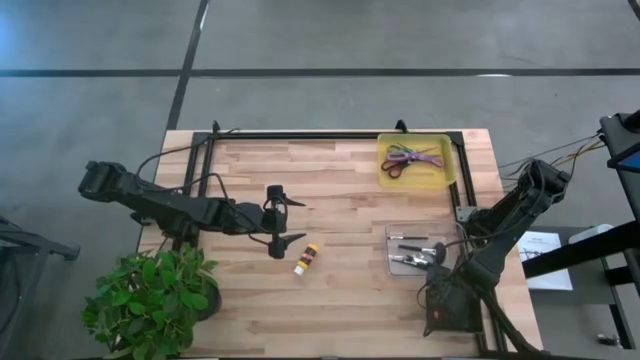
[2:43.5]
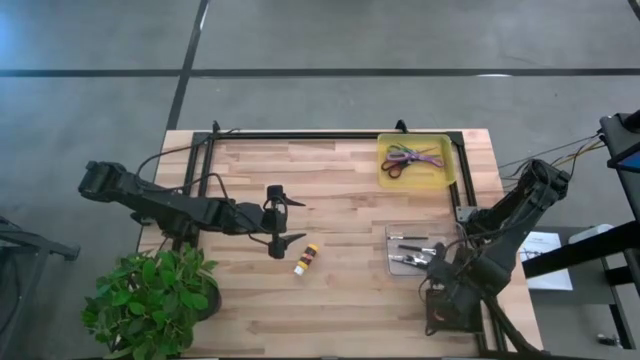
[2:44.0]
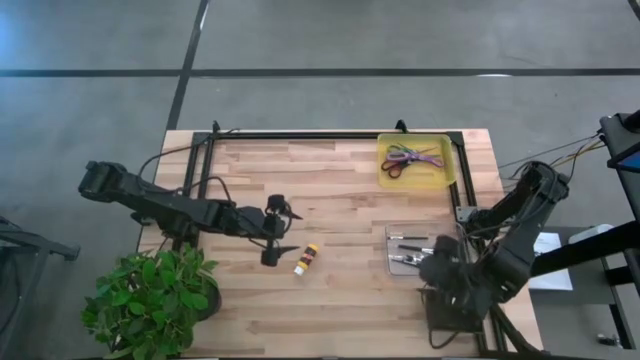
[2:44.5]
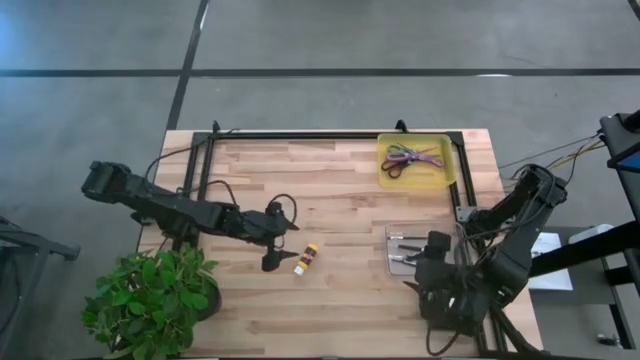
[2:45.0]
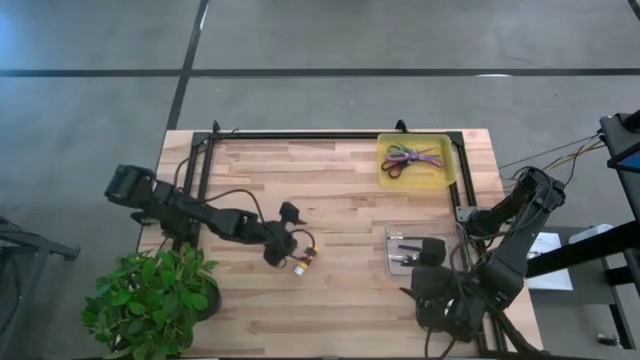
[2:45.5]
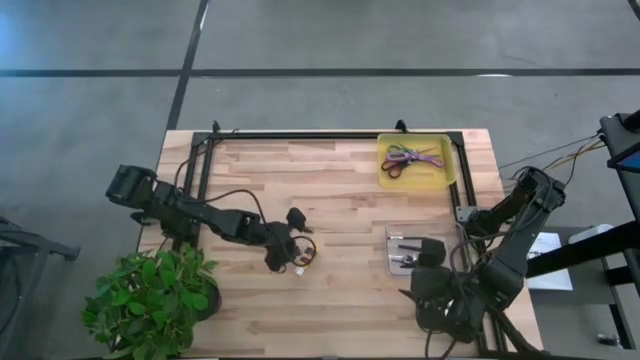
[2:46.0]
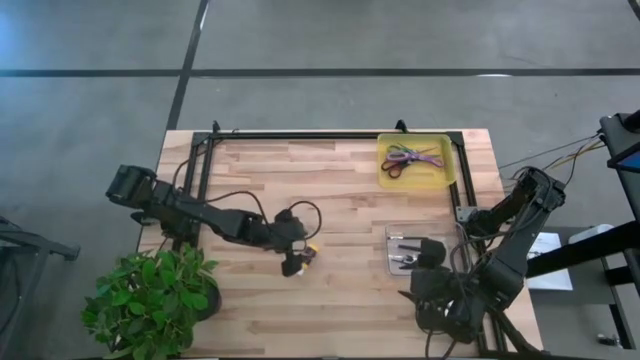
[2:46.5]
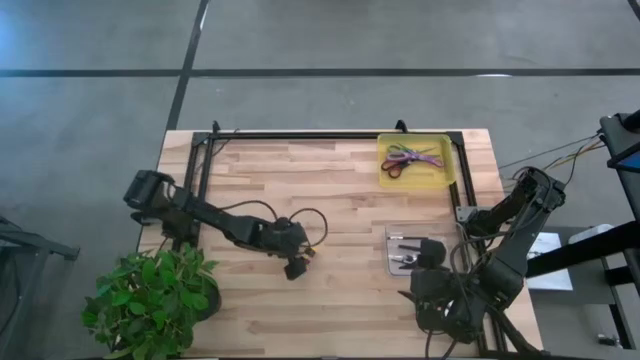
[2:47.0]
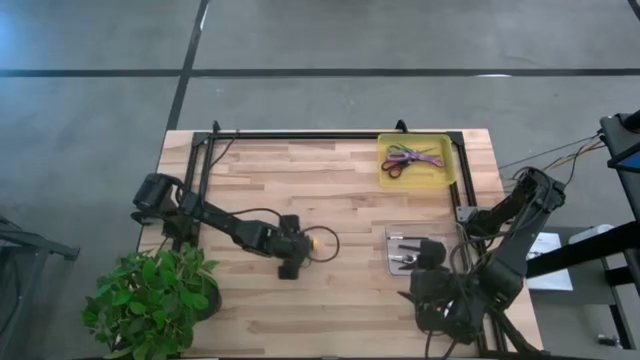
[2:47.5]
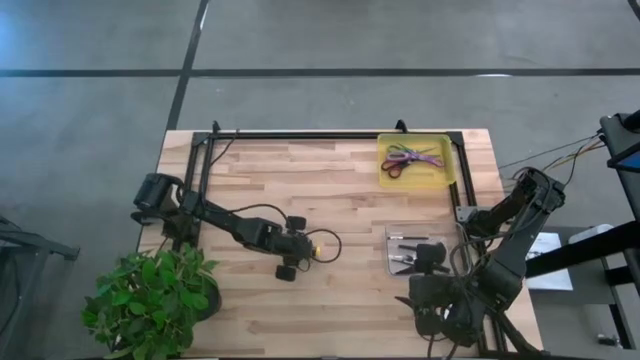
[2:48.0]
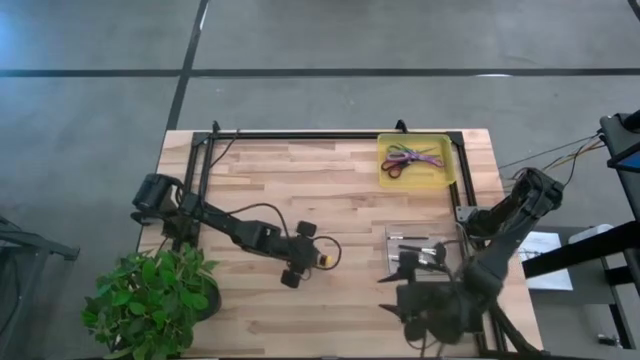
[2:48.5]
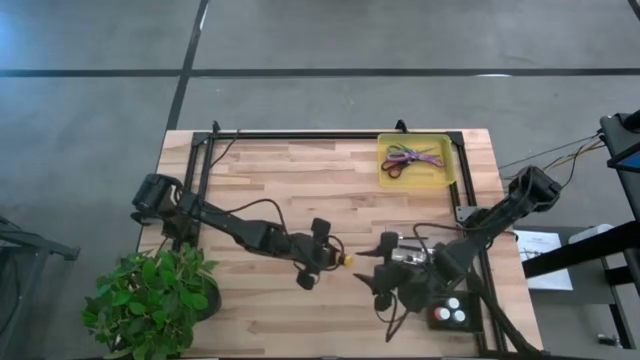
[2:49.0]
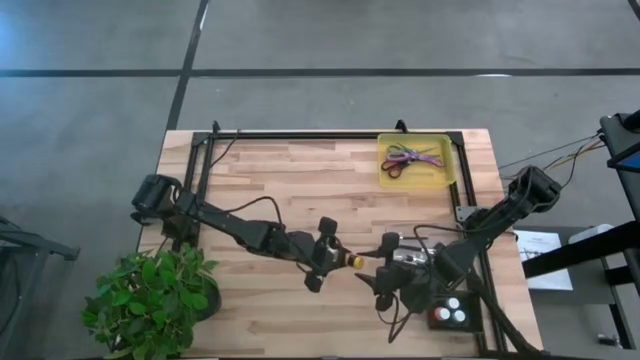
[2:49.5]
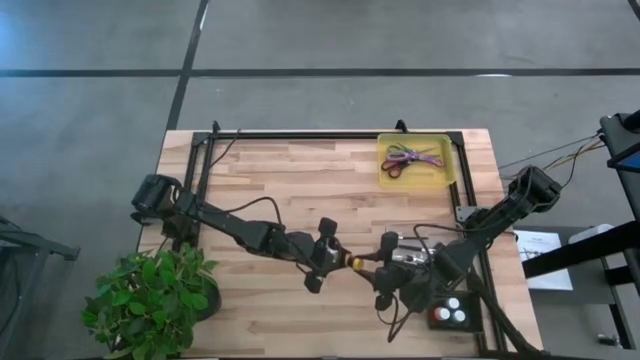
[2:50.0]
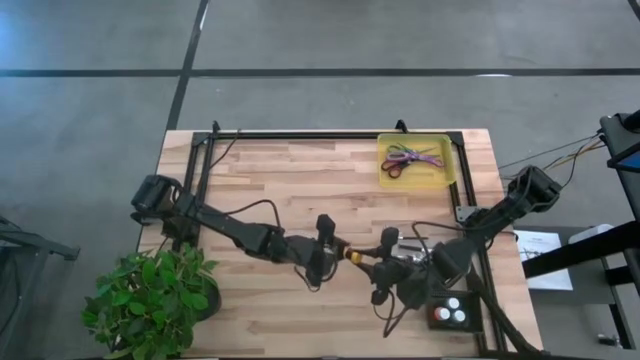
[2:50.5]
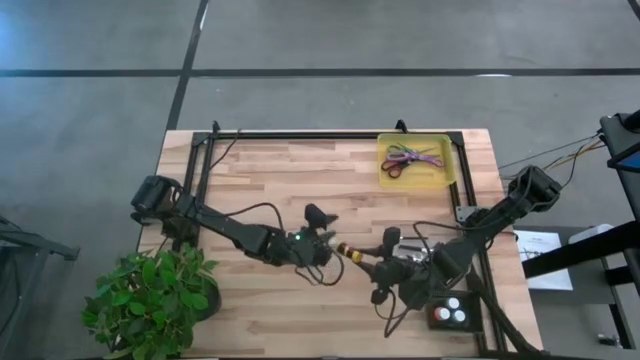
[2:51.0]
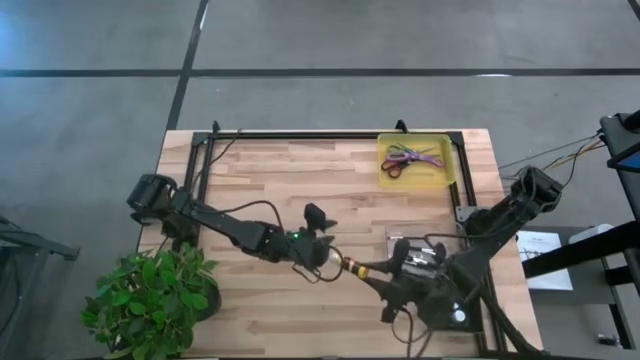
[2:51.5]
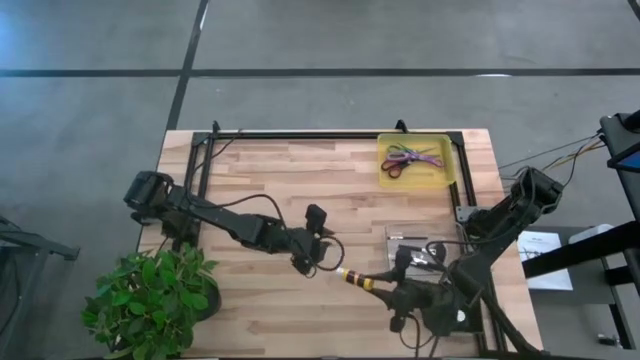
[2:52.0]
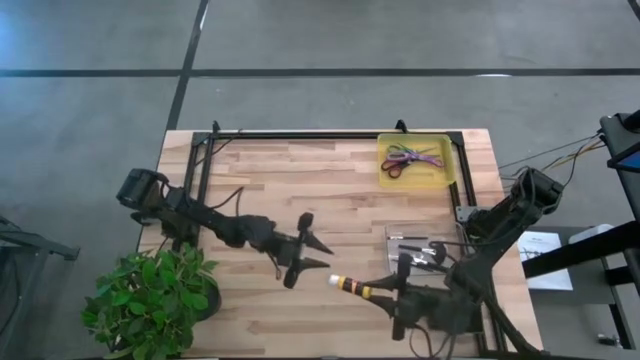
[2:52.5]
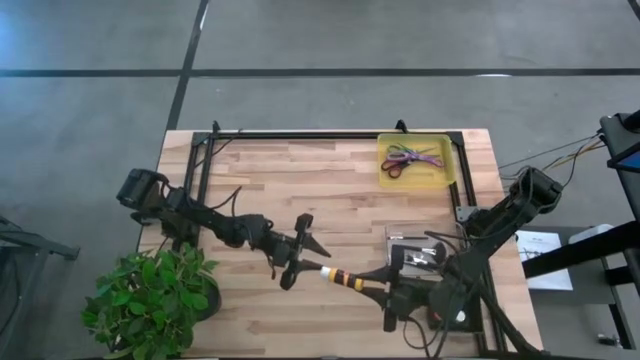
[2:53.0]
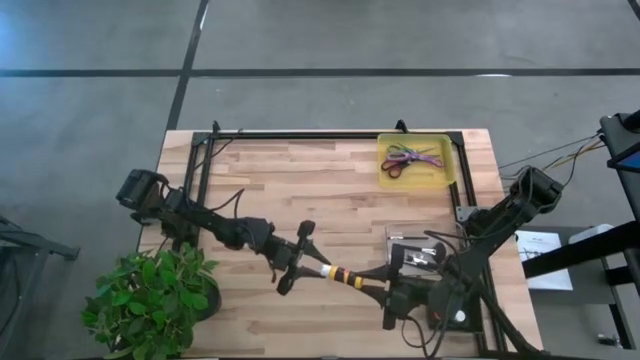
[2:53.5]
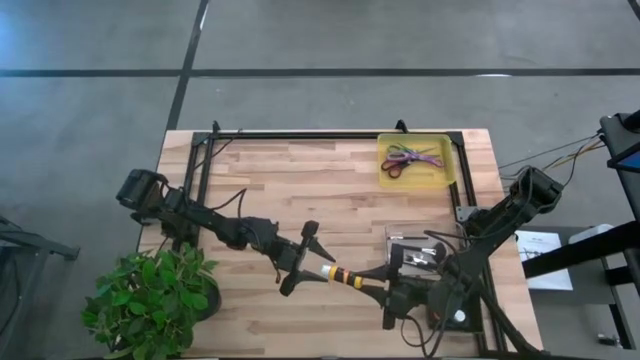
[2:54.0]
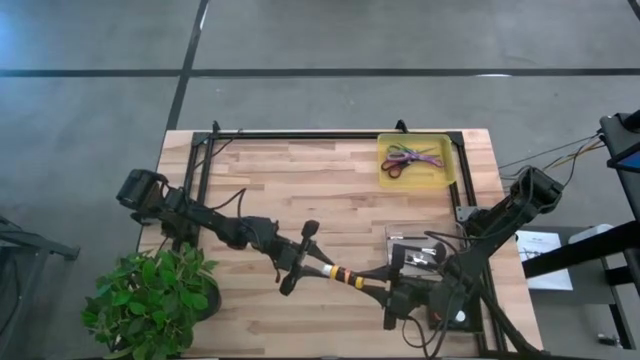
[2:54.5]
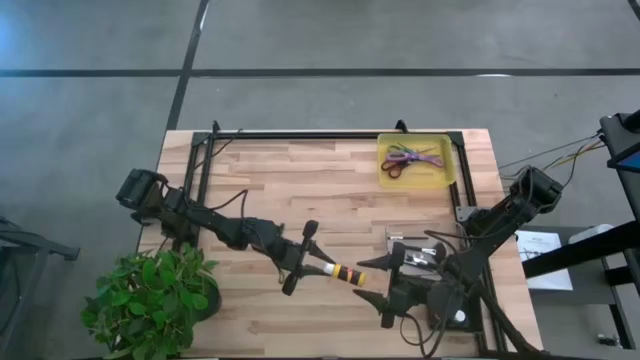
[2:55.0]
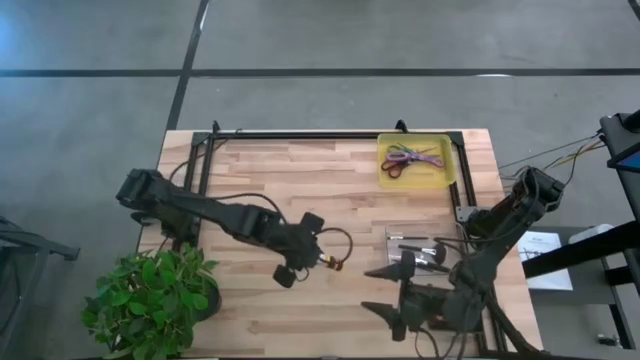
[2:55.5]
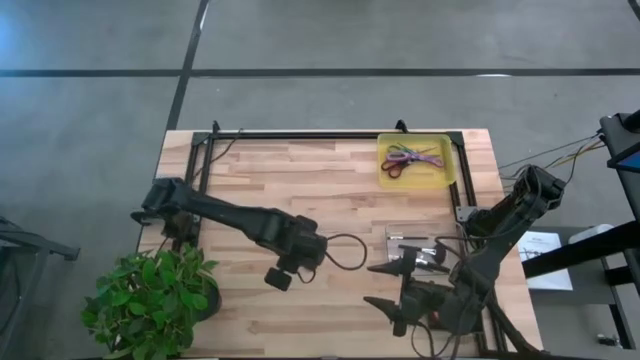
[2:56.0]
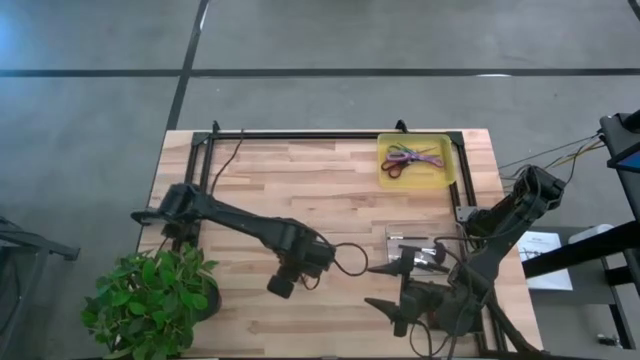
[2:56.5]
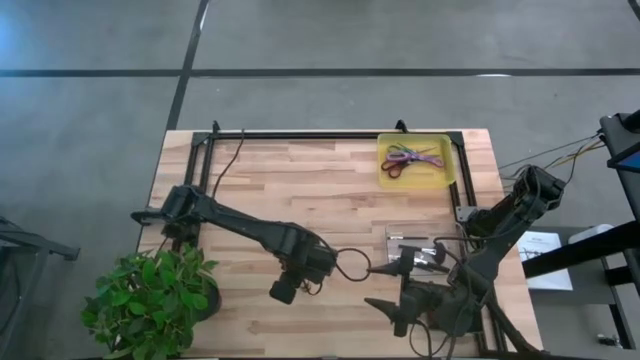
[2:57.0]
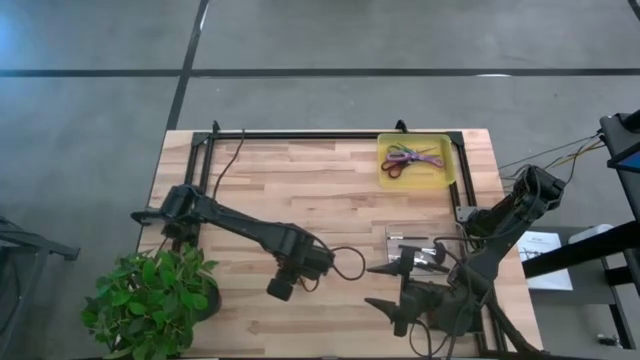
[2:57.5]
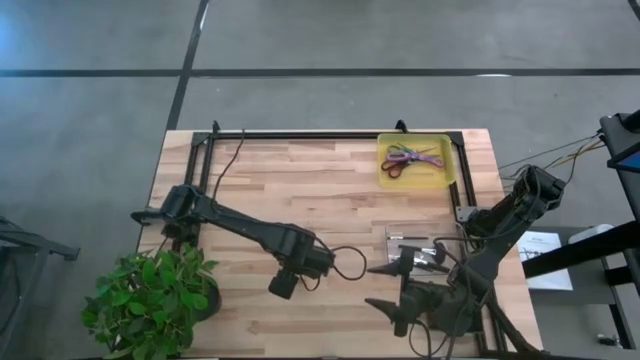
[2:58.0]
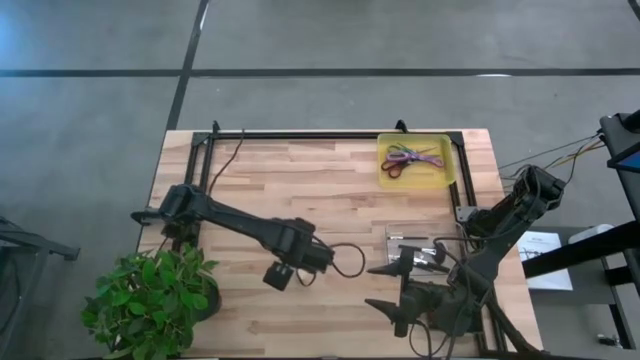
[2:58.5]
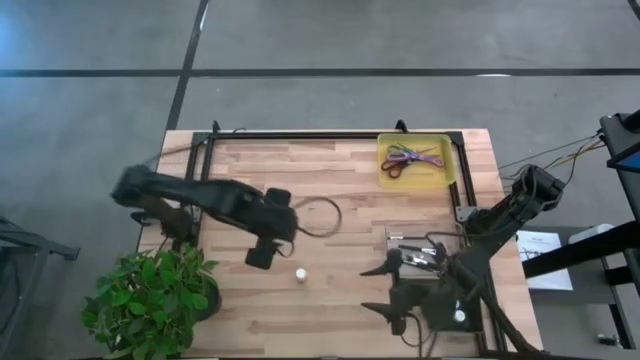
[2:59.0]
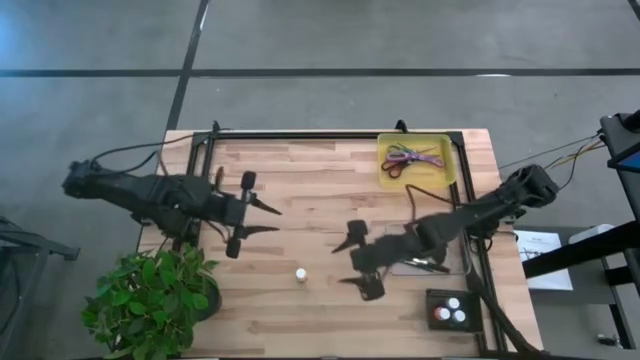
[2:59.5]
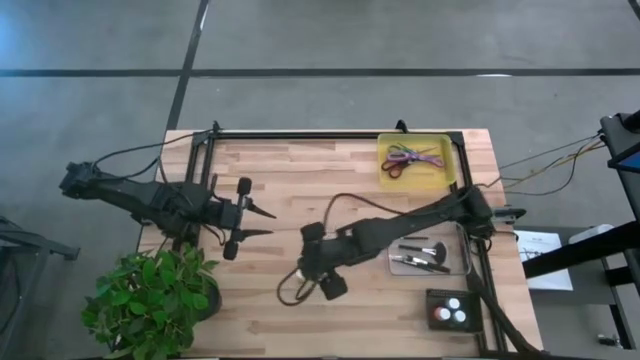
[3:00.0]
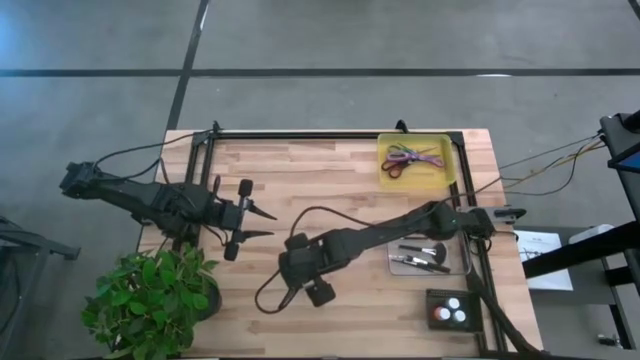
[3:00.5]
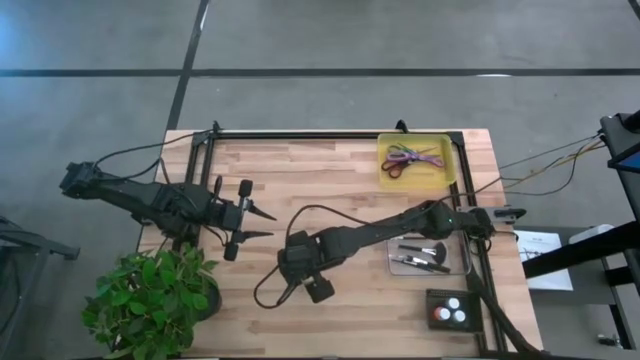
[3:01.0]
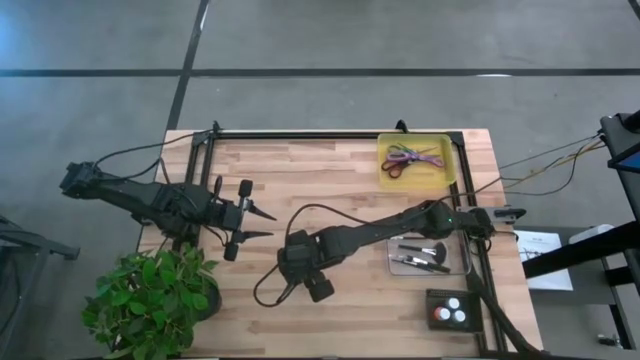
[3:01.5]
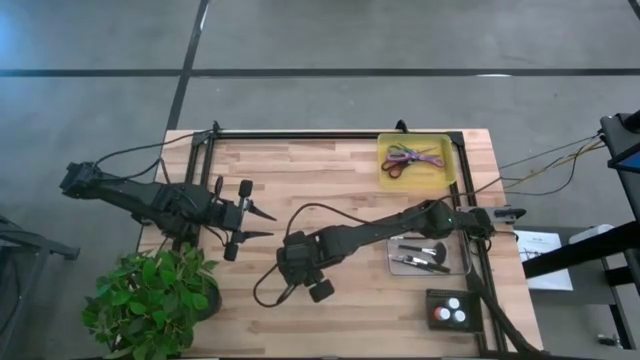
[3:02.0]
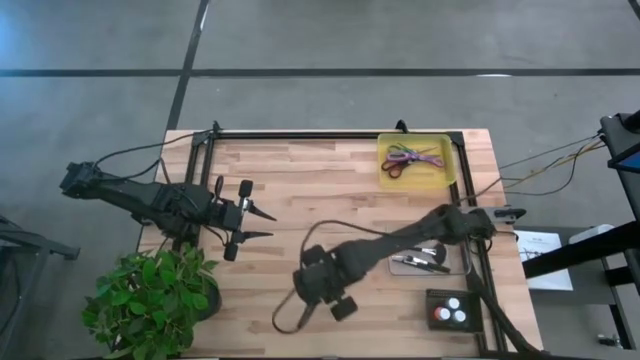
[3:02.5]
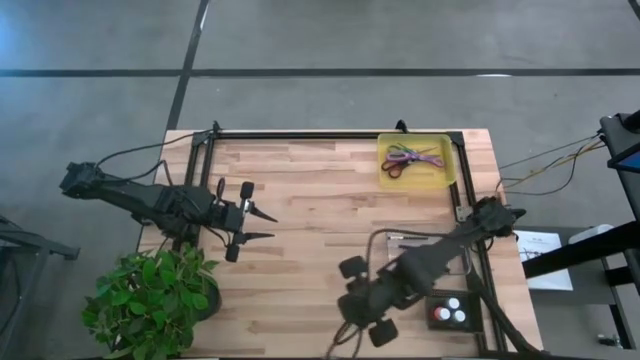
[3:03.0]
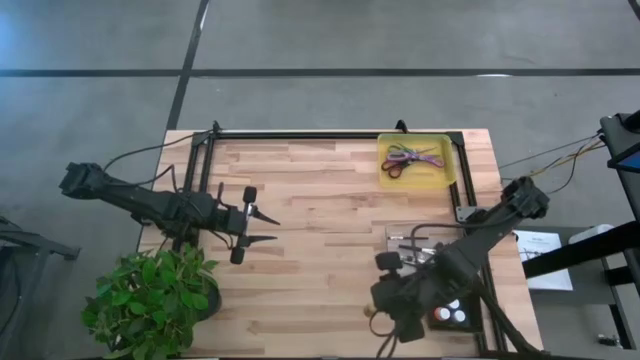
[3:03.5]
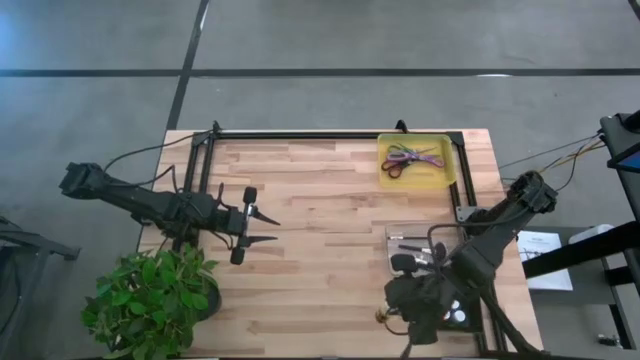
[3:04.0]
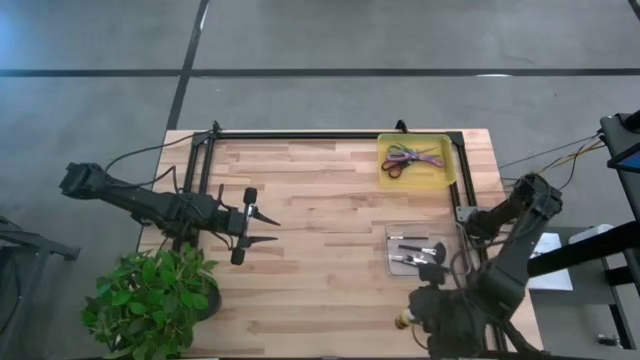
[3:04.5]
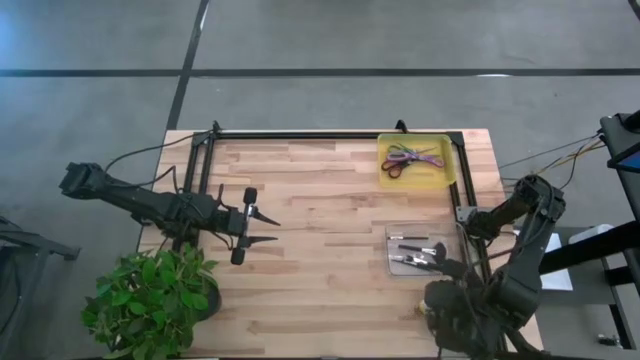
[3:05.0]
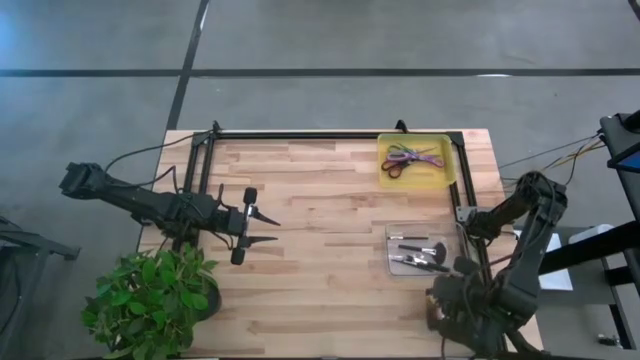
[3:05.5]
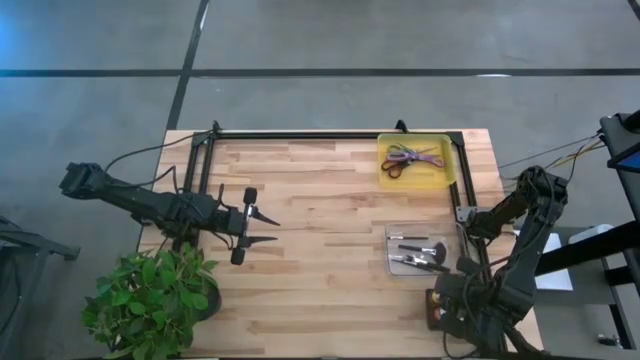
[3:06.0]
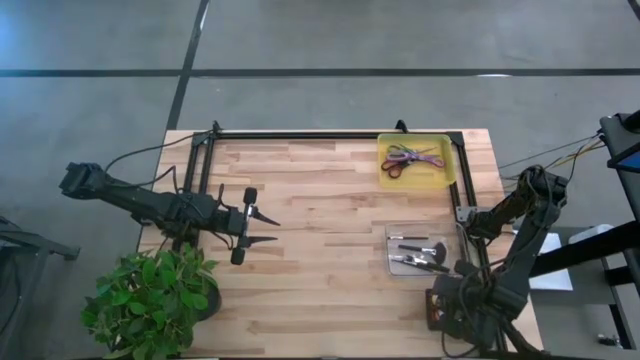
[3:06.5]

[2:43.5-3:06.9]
Task: Pick & Place Paint Supplies
Put the yellow paint bottle into the black bin
